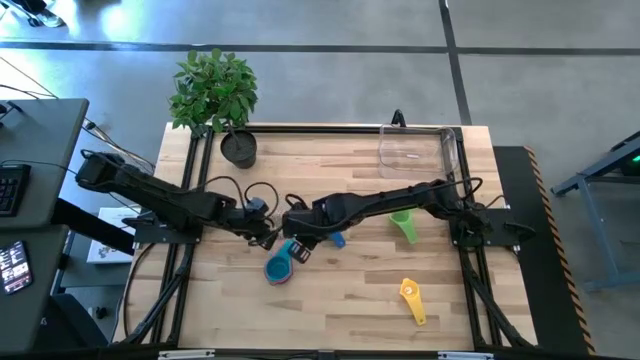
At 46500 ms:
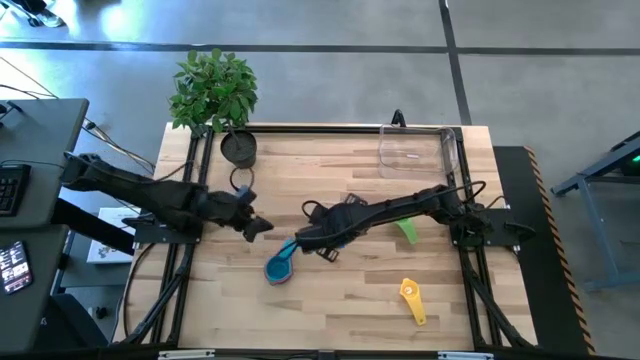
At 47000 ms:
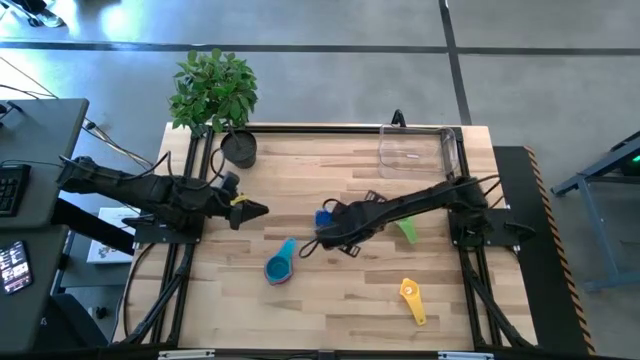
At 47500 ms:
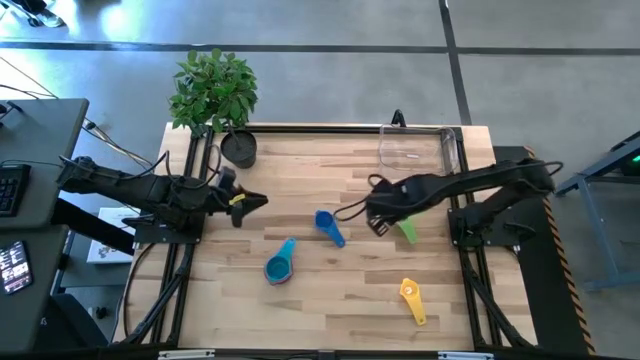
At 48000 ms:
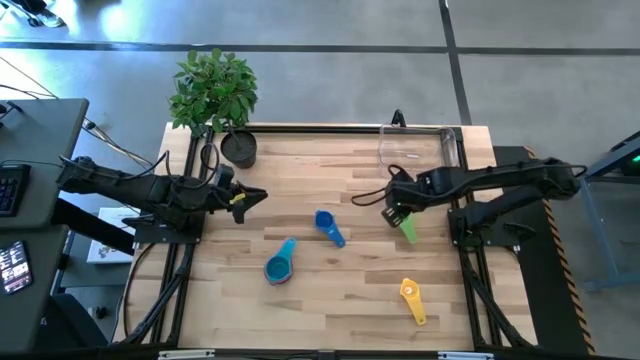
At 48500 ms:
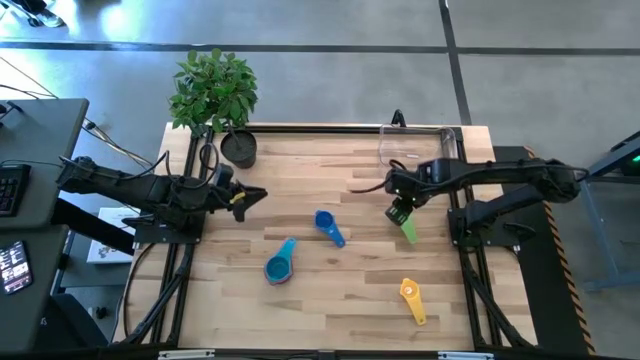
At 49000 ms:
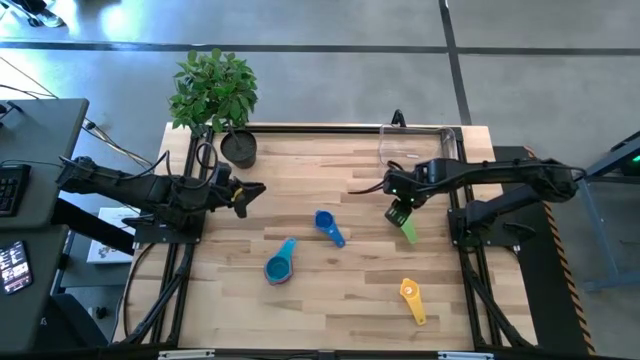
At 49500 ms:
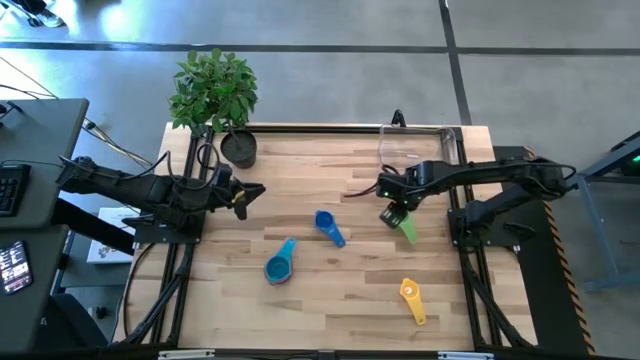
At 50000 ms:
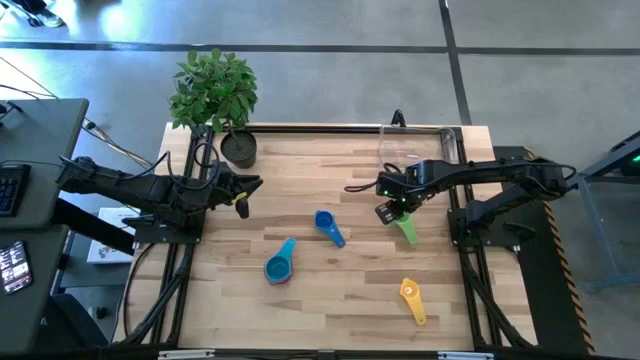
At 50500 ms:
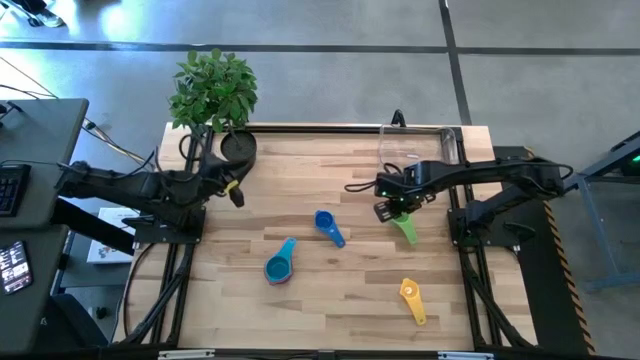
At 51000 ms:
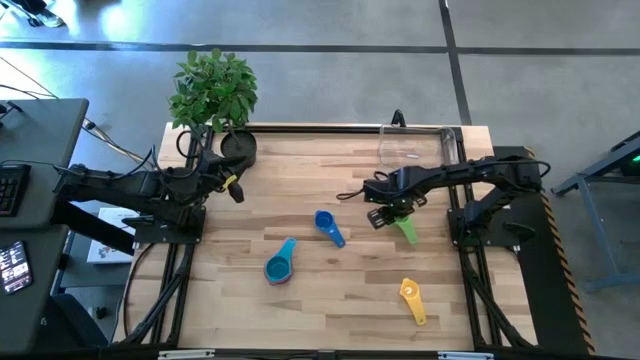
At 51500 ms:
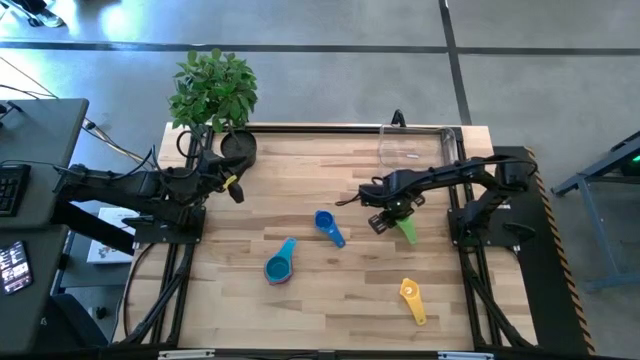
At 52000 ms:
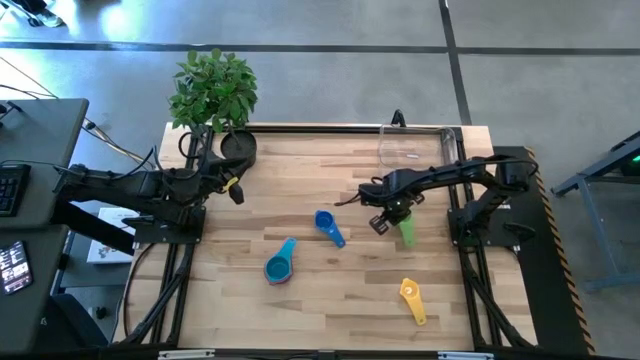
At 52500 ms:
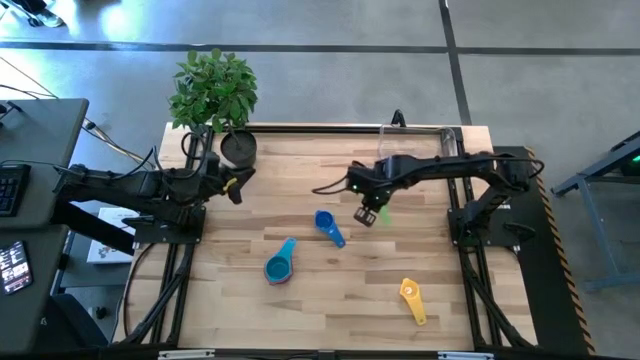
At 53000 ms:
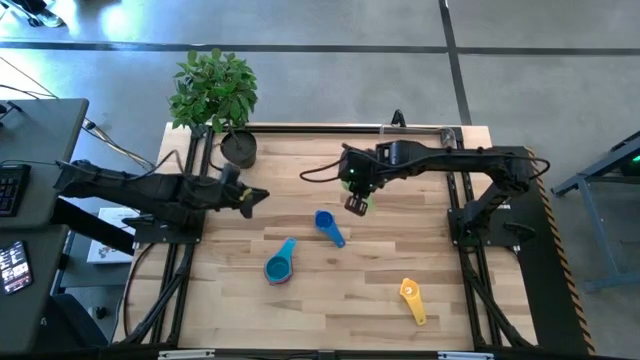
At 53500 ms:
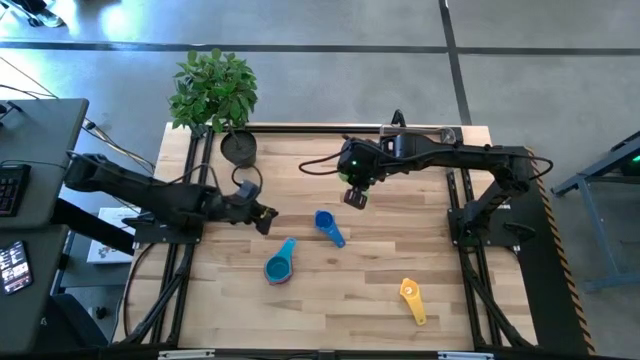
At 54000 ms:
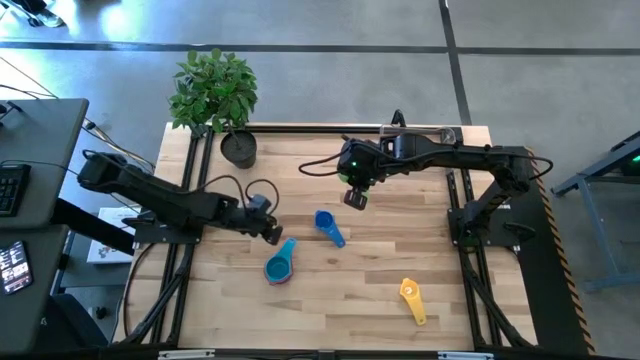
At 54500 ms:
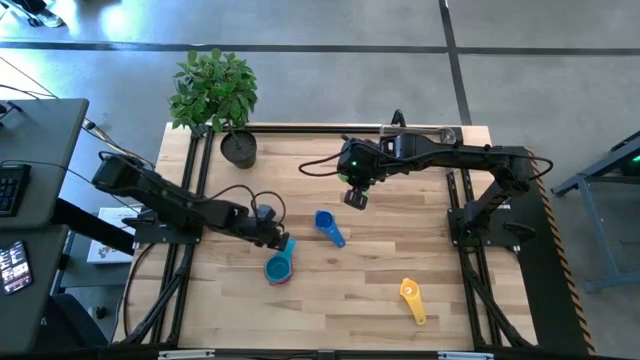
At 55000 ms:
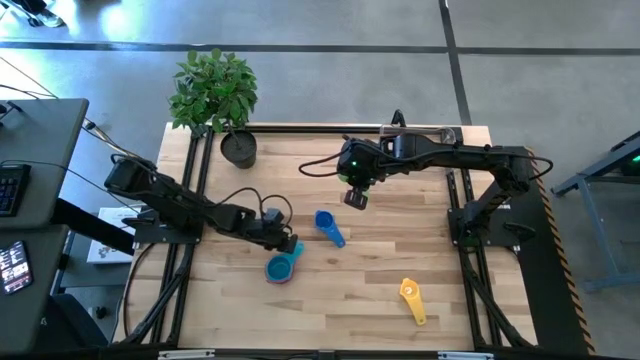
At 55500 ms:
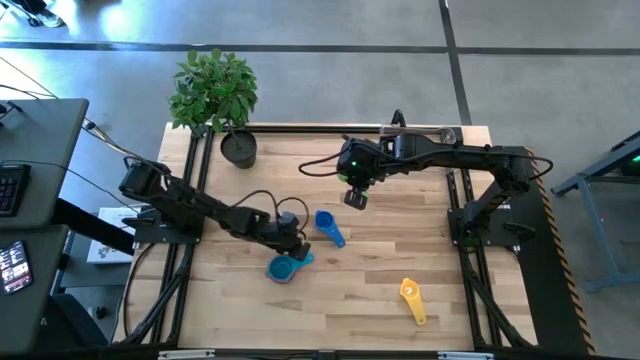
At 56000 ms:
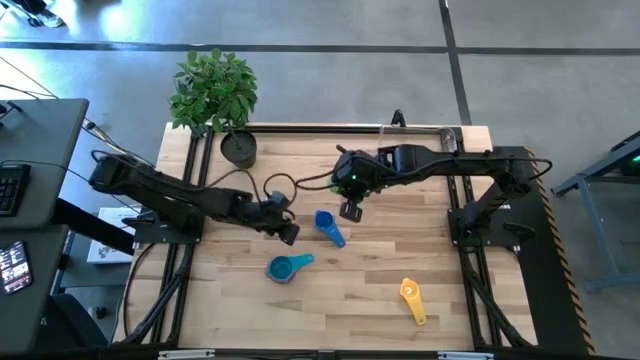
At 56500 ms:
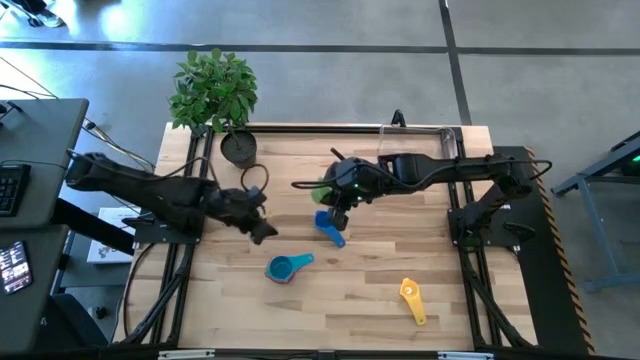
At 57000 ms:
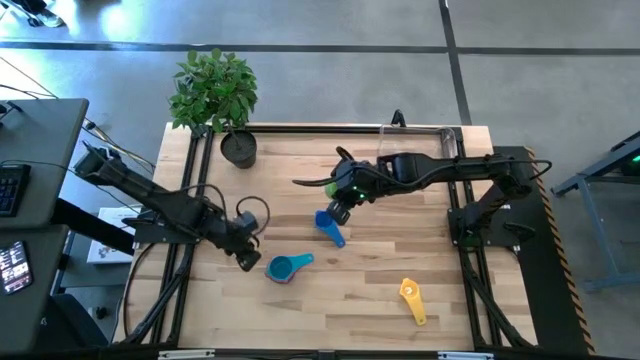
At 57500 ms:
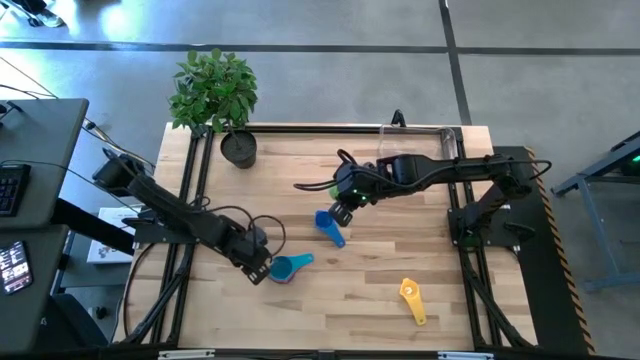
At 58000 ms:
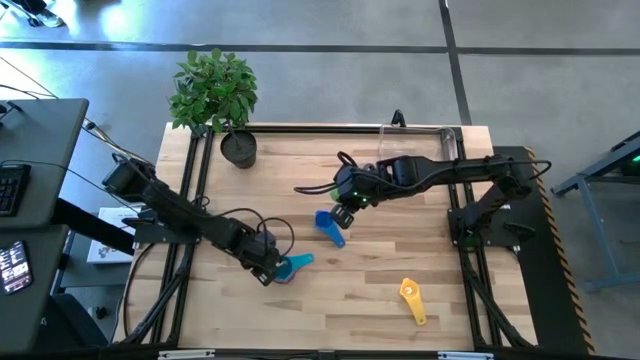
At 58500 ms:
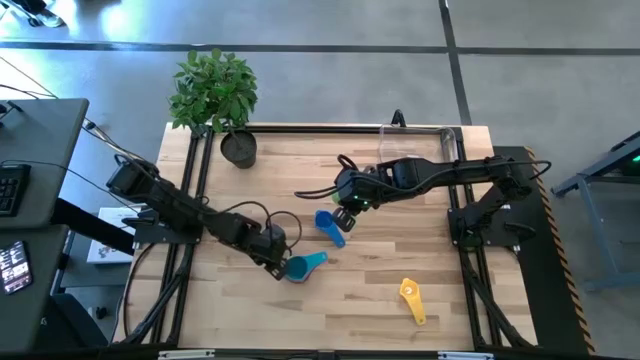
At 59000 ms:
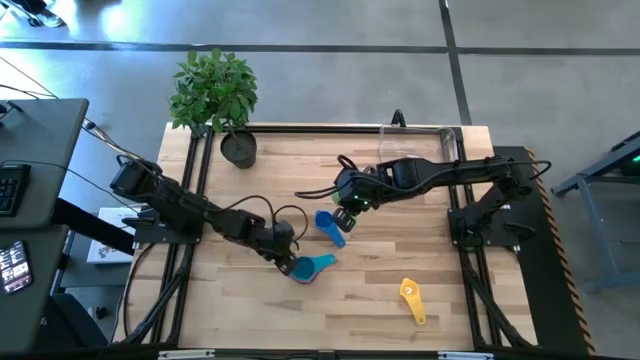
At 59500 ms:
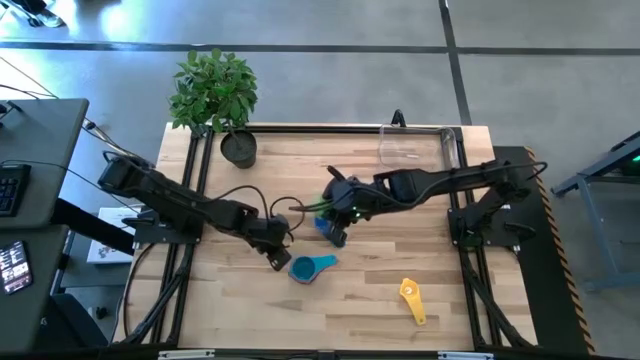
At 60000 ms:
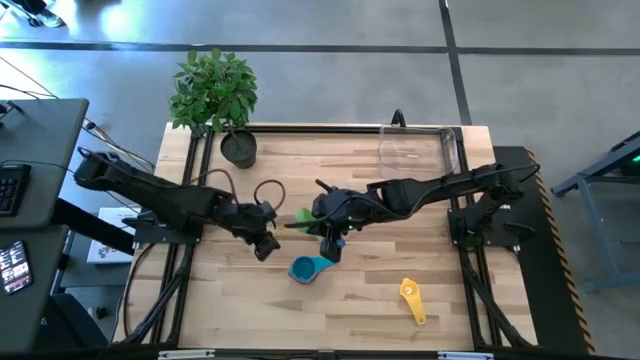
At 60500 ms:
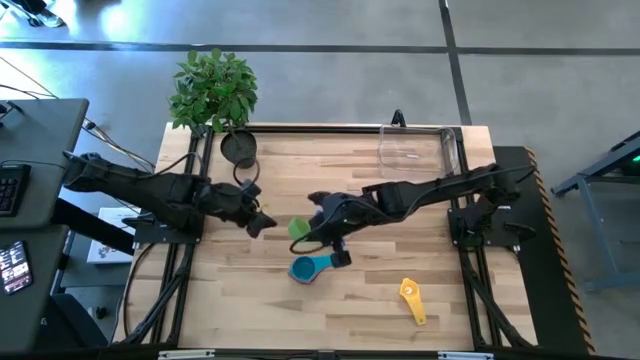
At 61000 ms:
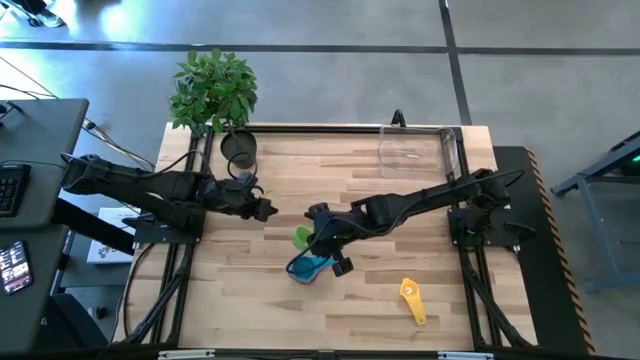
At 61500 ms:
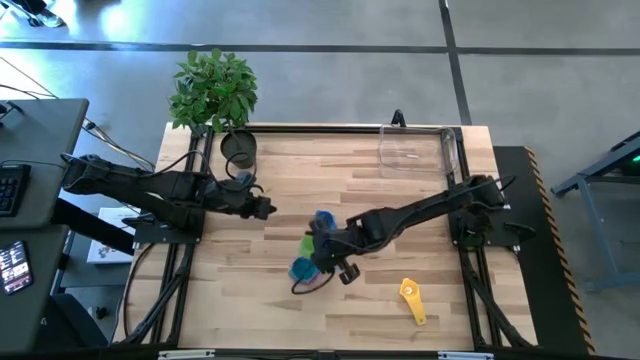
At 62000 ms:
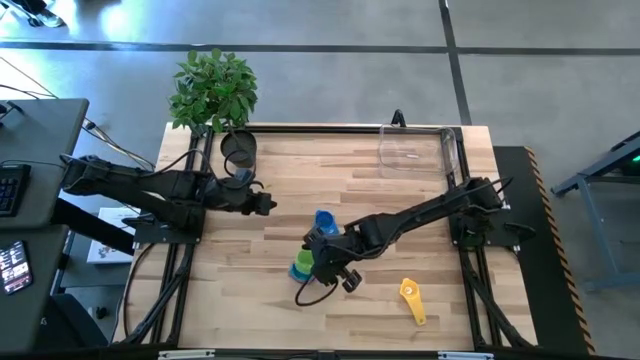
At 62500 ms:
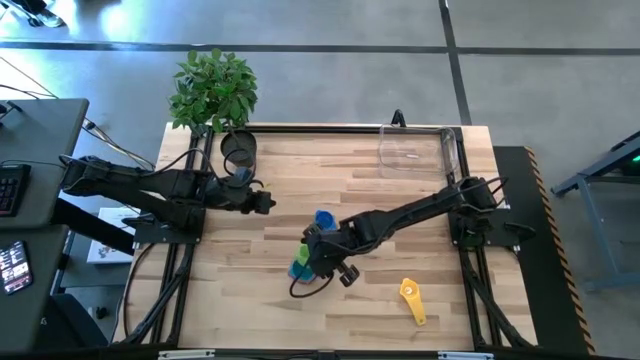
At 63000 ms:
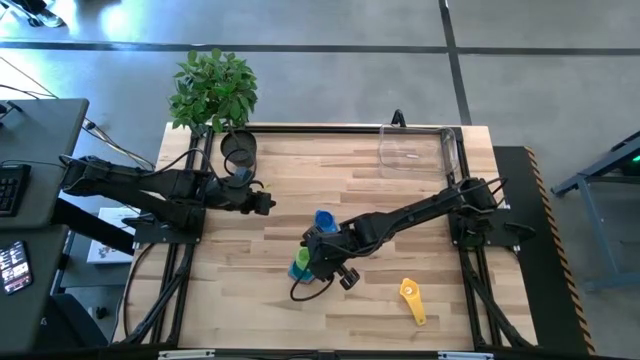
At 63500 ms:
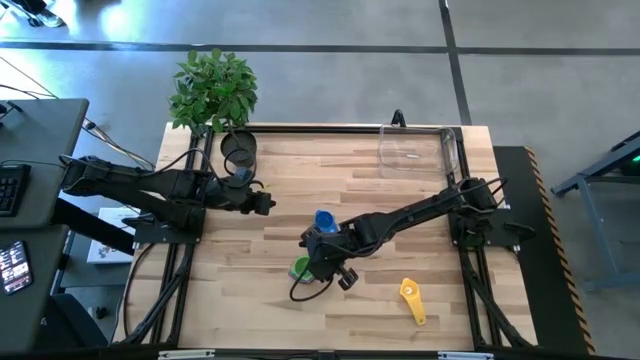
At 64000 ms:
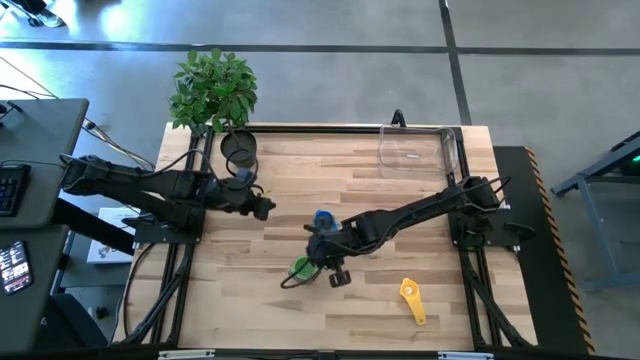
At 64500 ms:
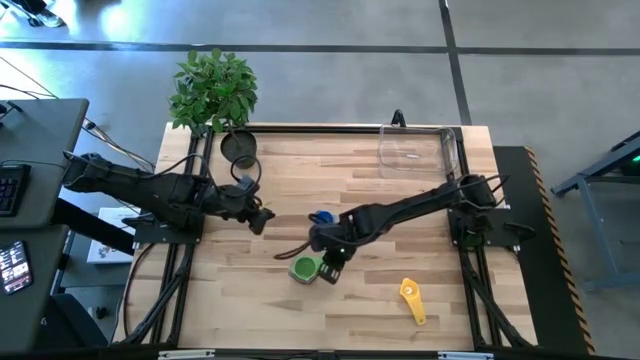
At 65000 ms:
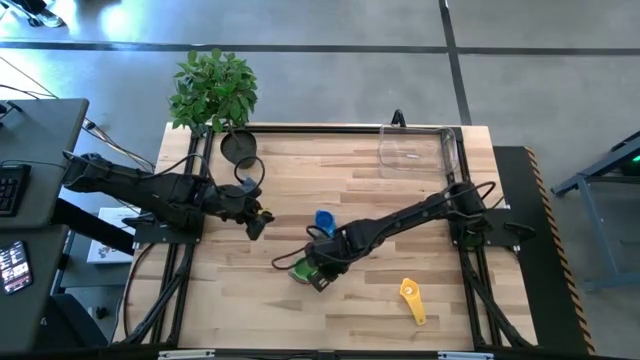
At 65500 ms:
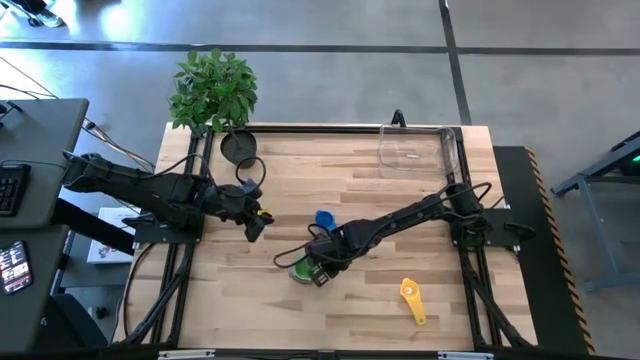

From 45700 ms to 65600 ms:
Task: Nest measuring cups in basket
Stack the green measuring cup on top of the light blue measuring cup

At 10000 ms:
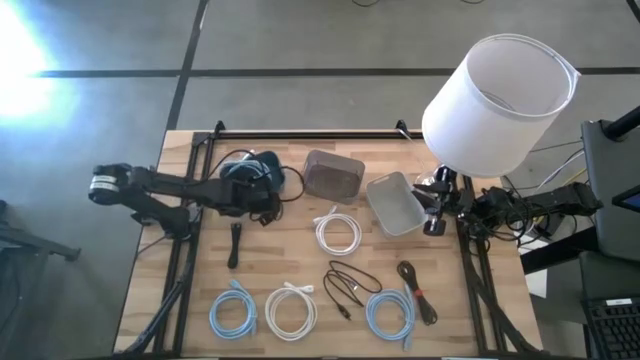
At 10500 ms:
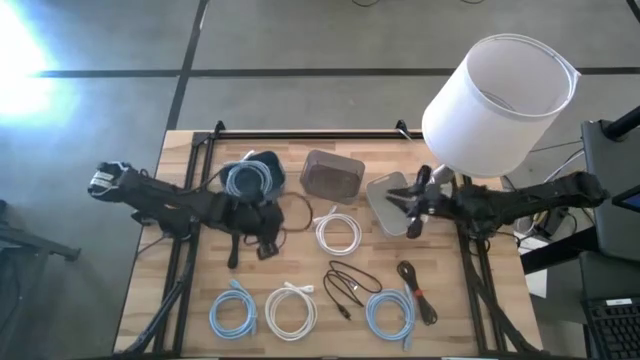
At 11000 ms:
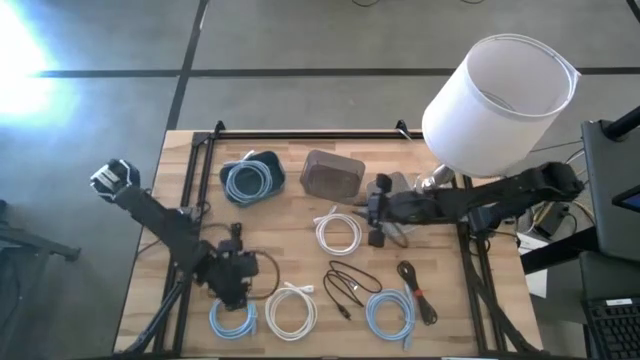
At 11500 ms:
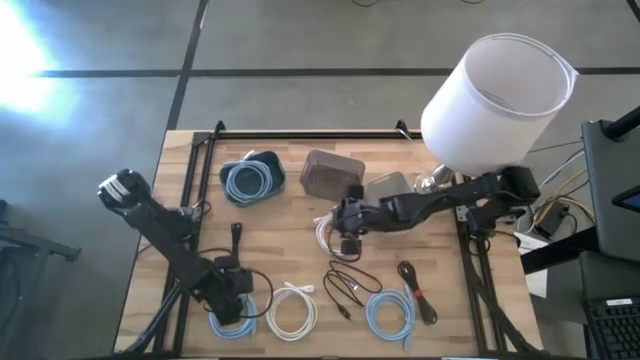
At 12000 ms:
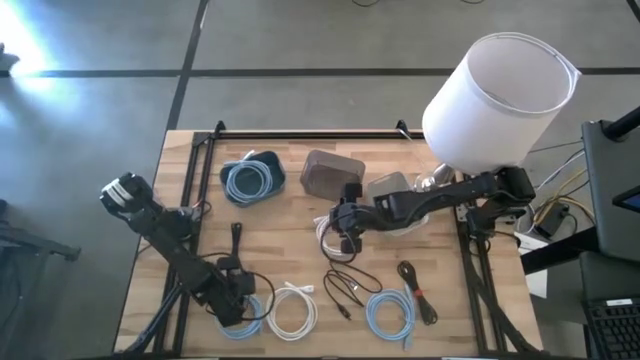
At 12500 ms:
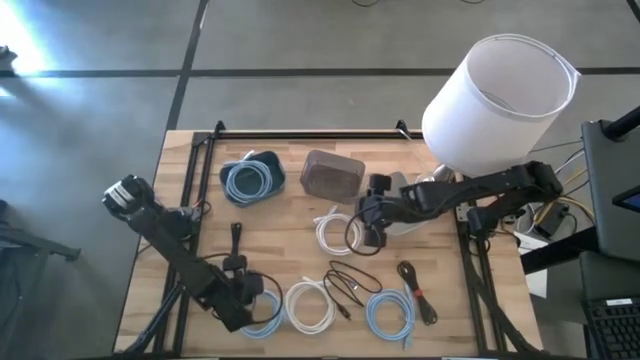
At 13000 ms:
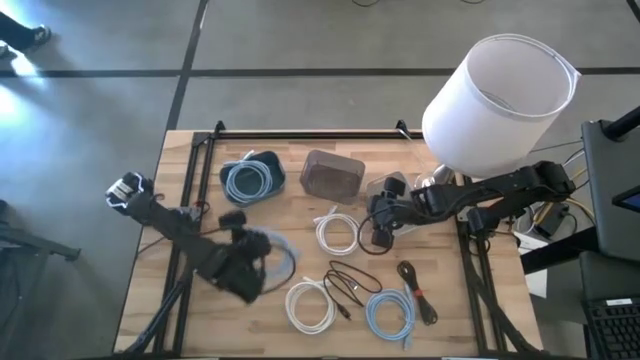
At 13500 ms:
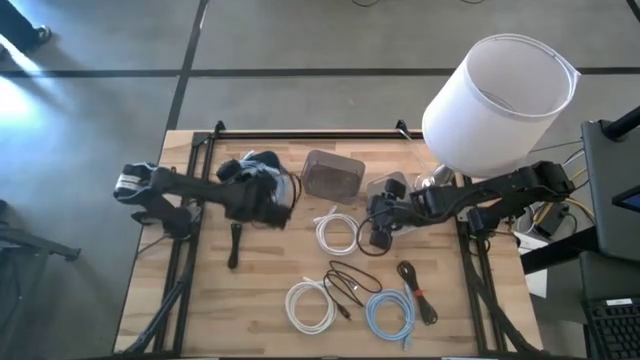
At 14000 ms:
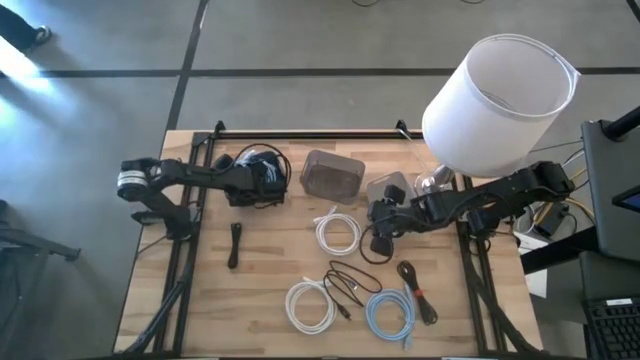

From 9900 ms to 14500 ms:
Task: Pick & Place USB Port
Put the left blue HDMI cable into the green bin
